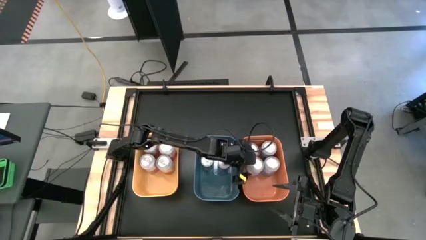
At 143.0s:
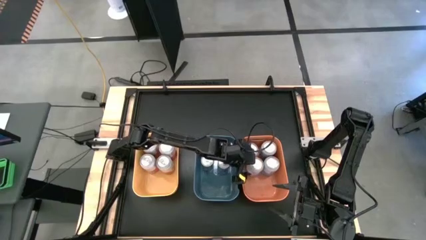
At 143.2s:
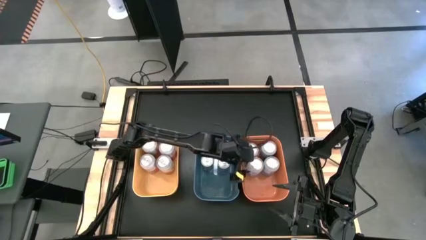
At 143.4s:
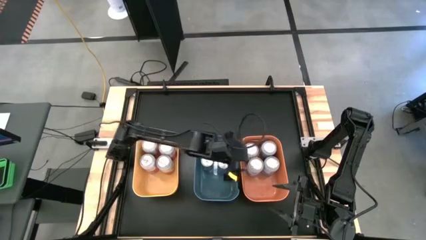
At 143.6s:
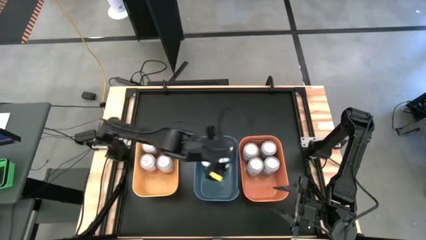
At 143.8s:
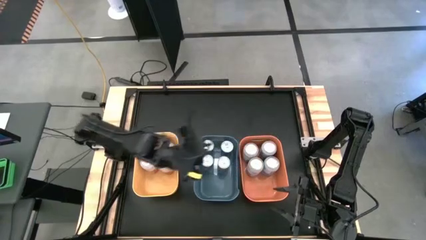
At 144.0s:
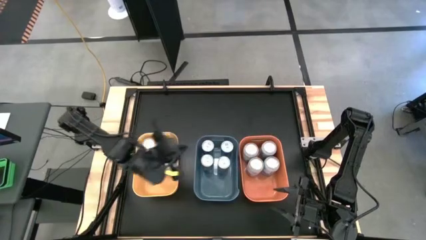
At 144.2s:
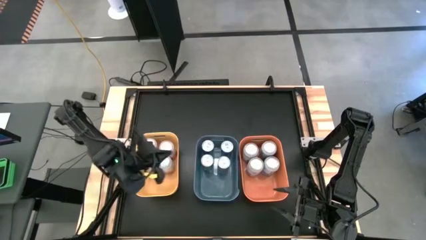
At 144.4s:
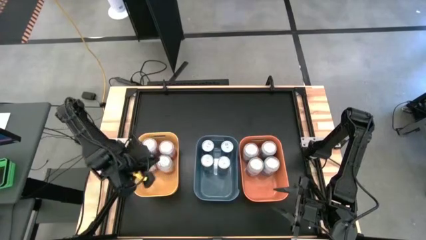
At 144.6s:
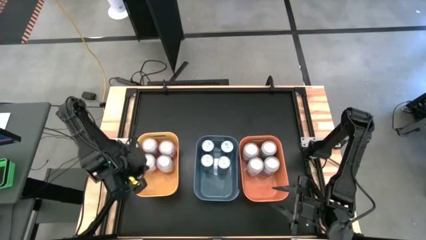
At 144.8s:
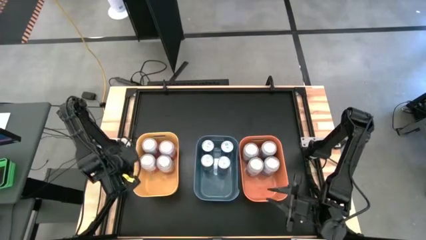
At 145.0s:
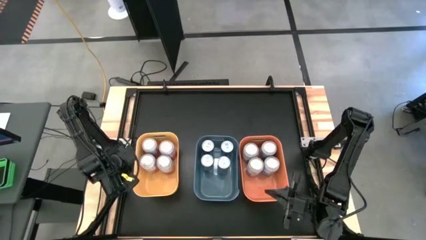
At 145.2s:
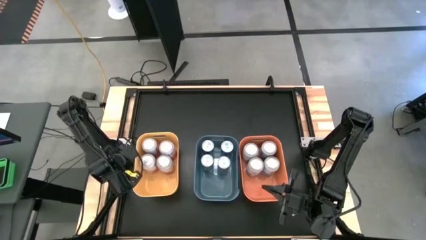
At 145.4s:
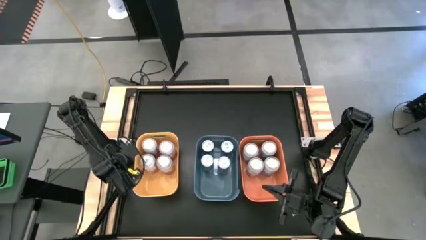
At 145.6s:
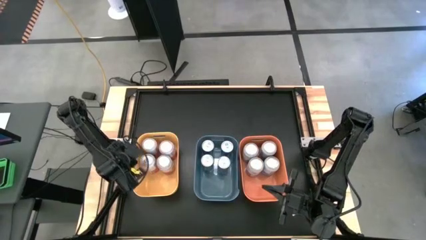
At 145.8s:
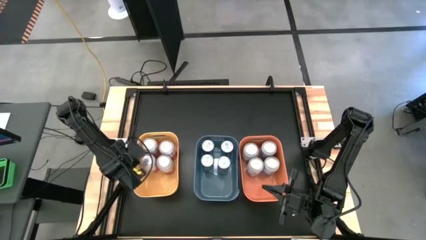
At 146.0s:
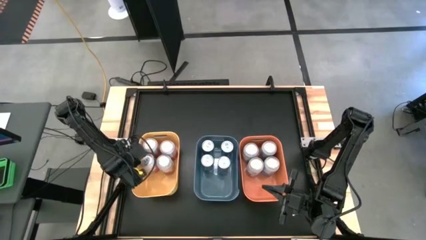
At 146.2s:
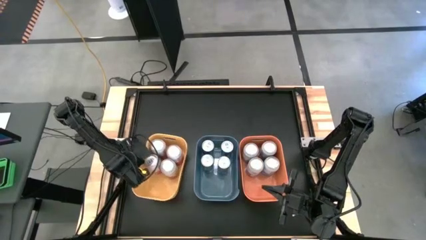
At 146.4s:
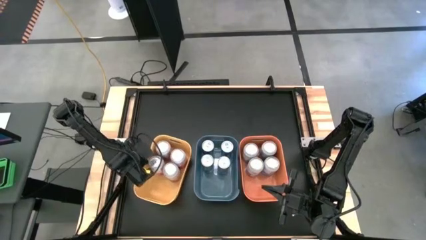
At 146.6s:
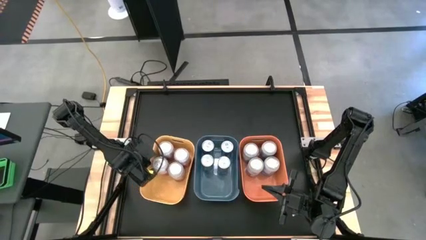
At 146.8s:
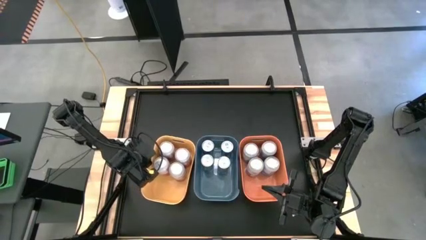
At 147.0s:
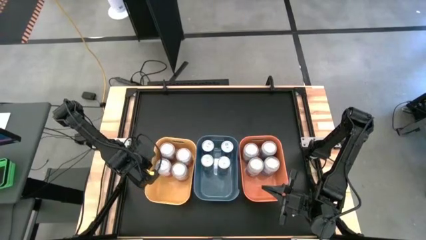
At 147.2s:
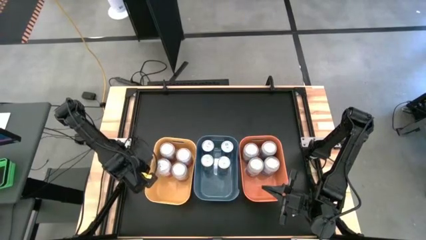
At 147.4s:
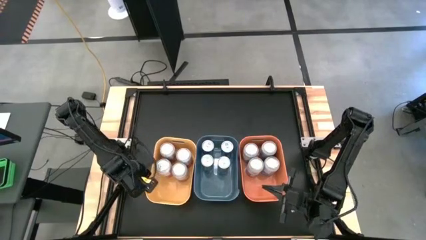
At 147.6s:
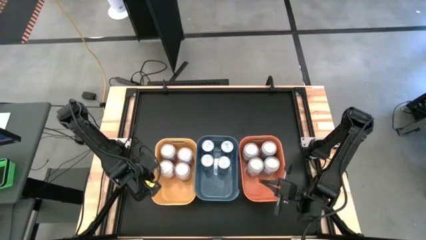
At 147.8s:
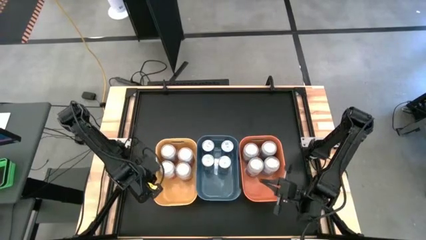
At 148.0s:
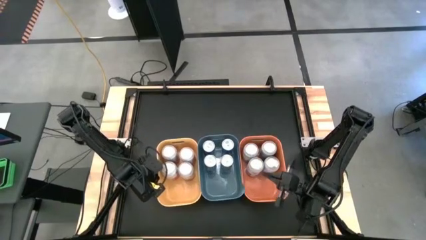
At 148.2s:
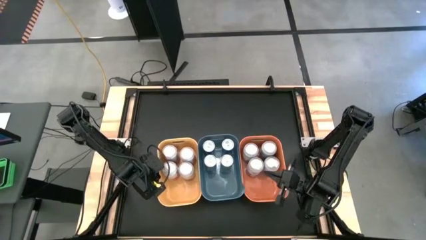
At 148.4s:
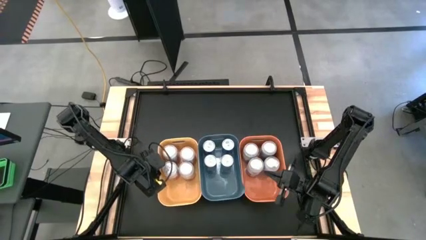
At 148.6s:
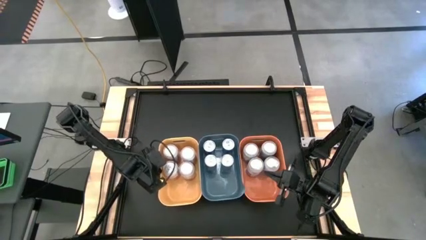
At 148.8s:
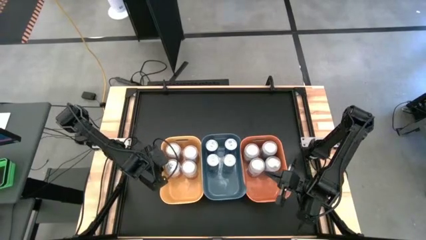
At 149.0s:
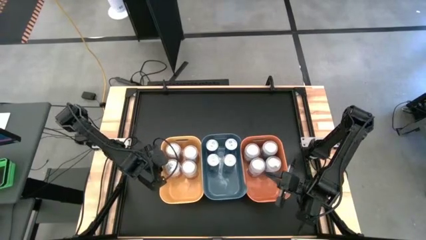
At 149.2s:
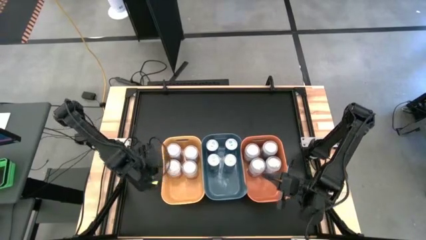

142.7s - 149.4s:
Task: Sort soda cans
Adjust the yellow bin

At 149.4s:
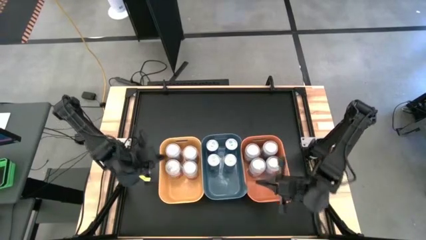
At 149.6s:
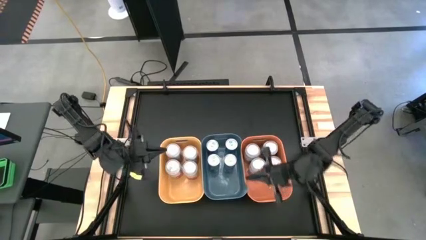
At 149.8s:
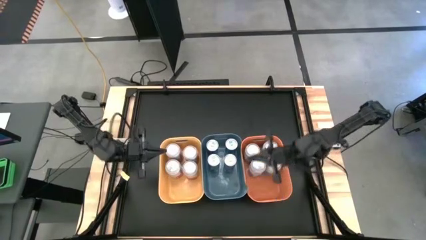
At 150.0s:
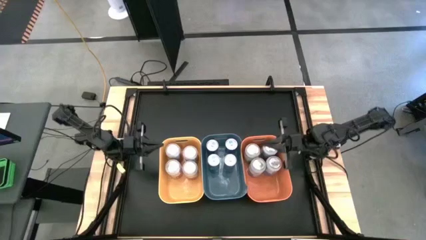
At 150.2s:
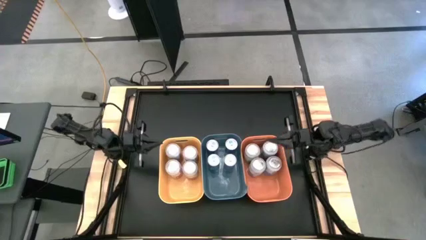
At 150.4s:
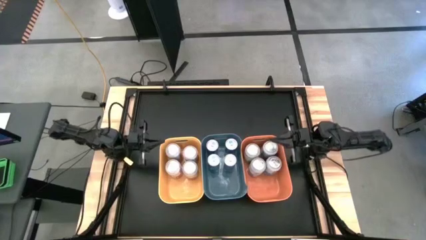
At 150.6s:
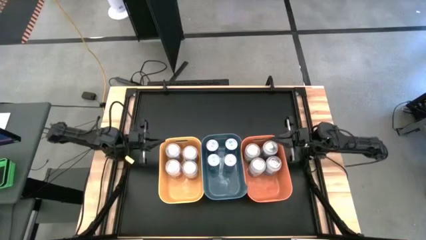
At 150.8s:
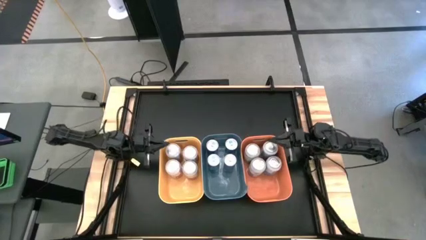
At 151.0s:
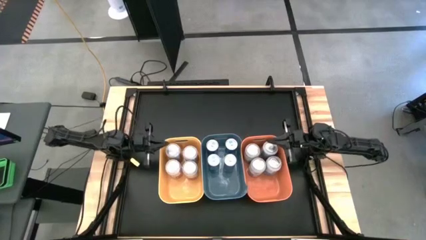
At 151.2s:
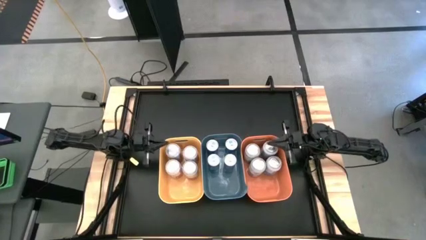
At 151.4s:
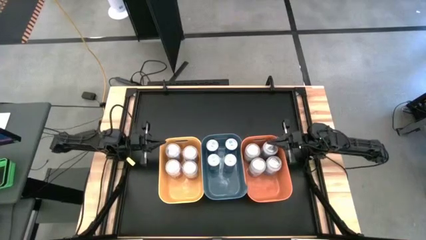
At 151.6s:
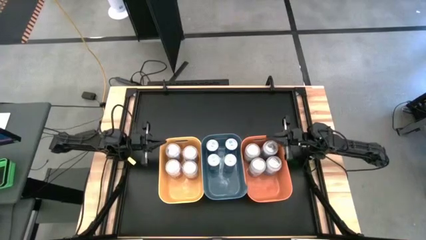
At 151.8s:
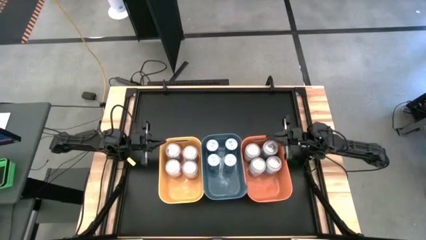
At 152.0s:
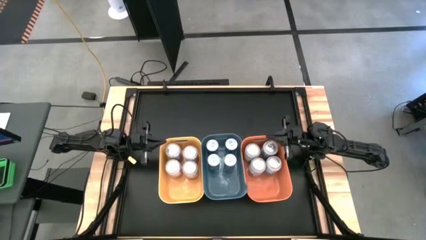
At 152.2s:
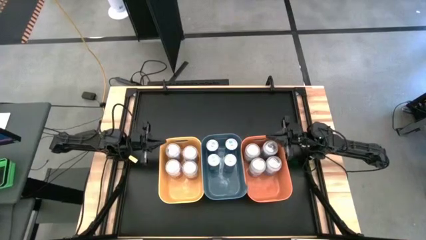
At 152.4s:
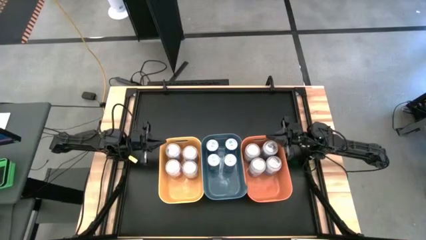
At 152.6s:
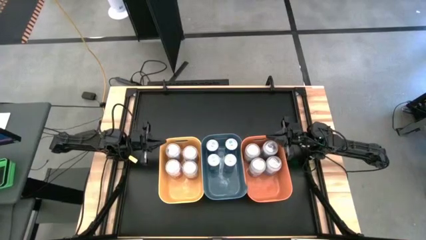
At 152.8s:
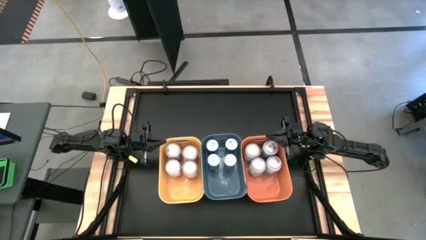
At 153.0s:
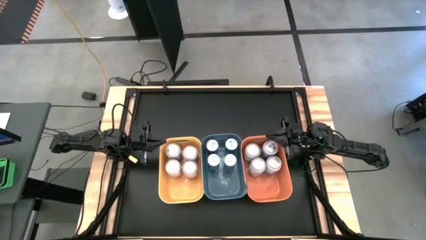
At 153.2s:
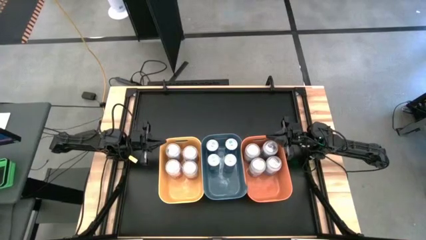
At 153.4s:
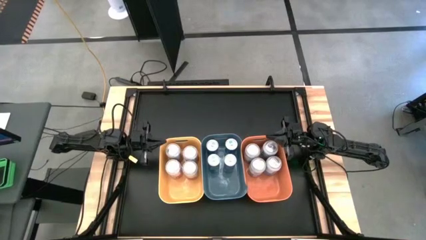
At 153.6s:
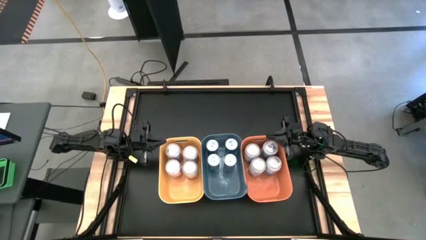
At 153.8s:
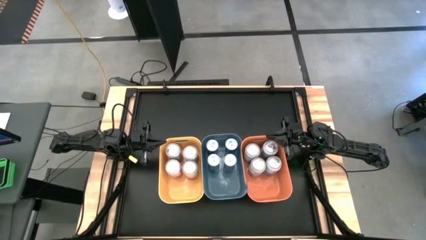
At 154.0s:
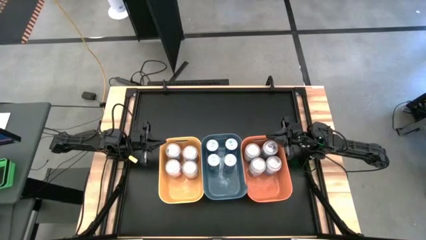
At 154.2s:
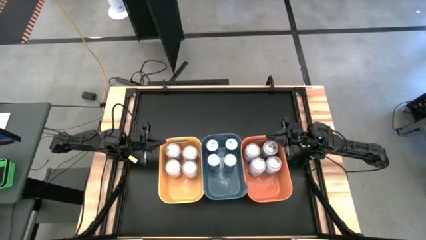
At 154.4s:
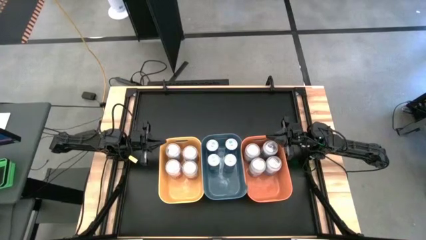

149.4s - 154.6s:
Return to Home Position

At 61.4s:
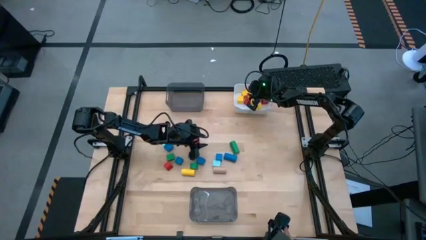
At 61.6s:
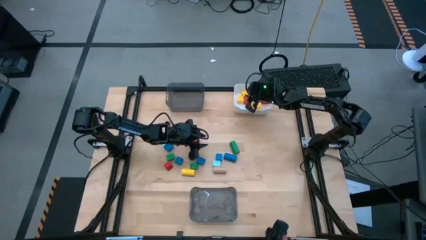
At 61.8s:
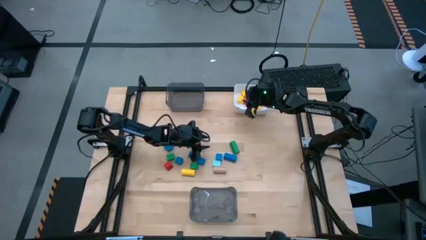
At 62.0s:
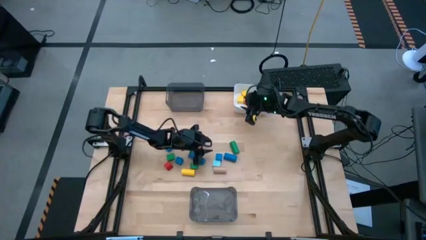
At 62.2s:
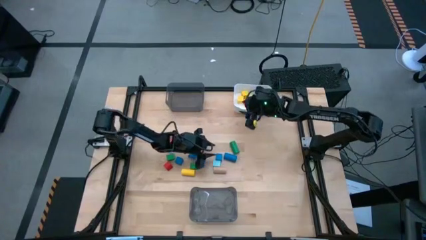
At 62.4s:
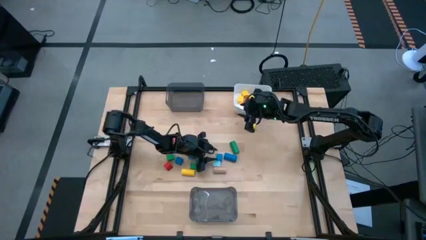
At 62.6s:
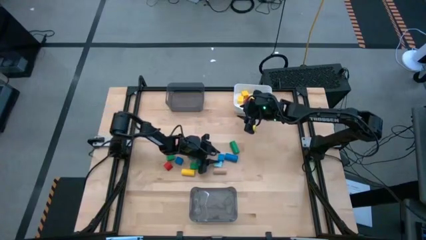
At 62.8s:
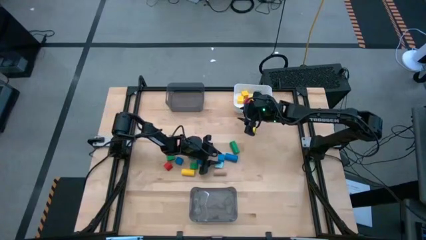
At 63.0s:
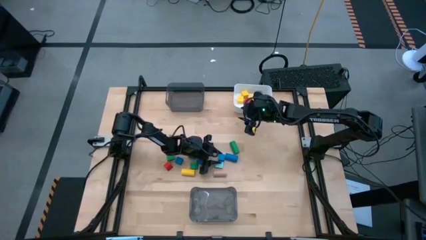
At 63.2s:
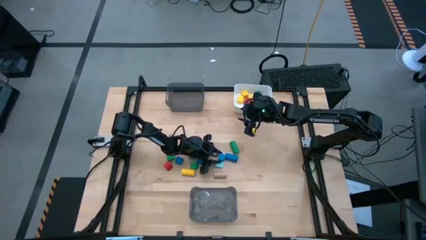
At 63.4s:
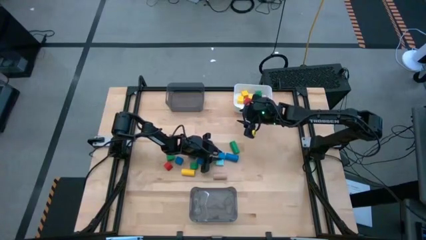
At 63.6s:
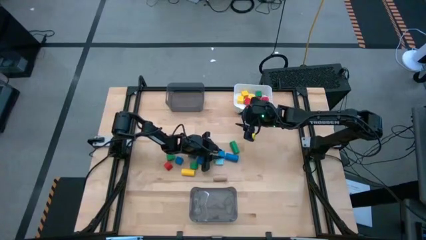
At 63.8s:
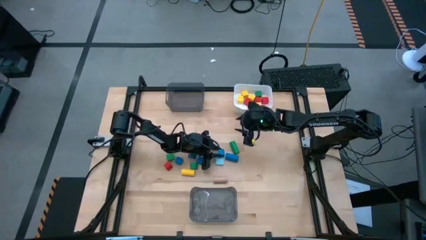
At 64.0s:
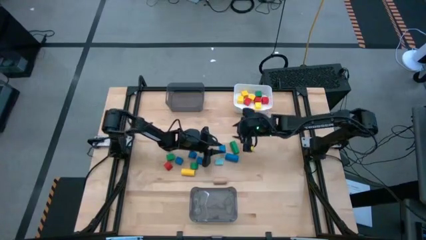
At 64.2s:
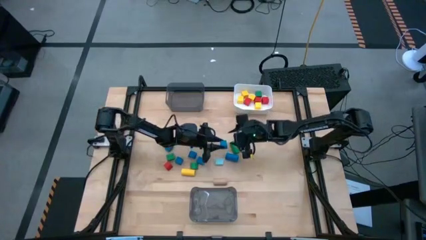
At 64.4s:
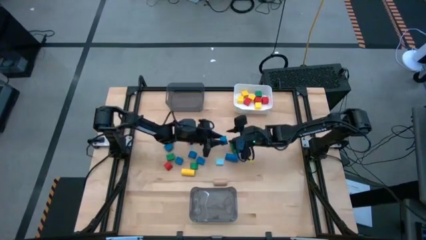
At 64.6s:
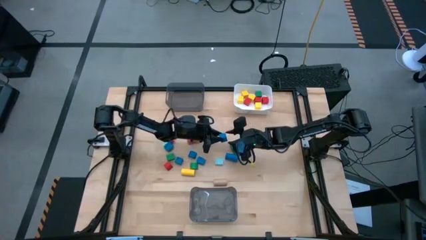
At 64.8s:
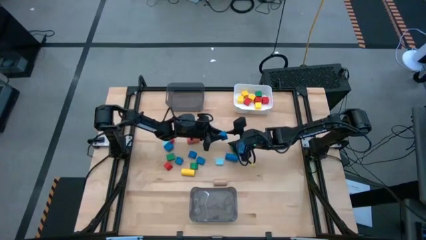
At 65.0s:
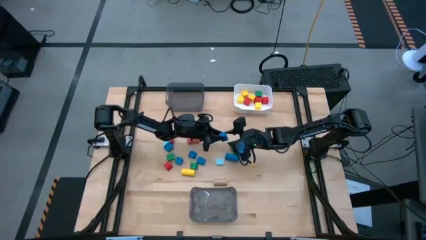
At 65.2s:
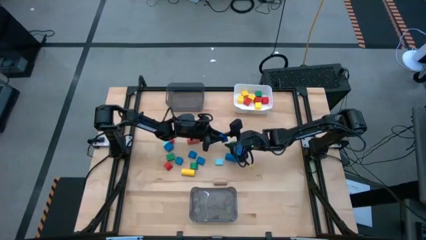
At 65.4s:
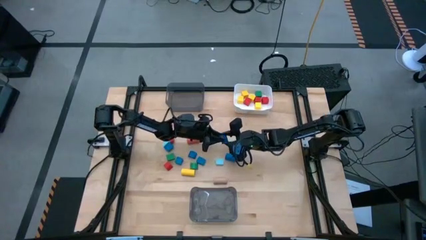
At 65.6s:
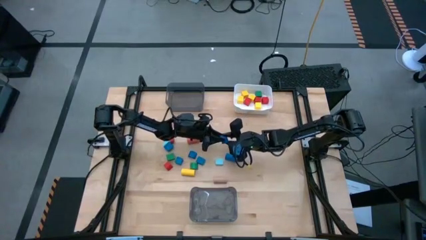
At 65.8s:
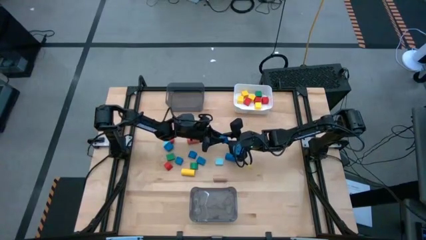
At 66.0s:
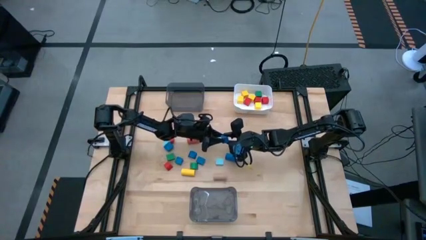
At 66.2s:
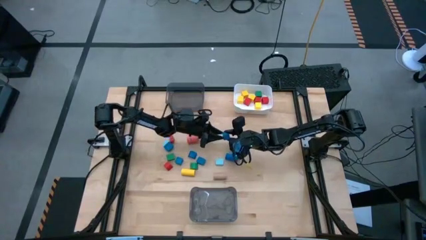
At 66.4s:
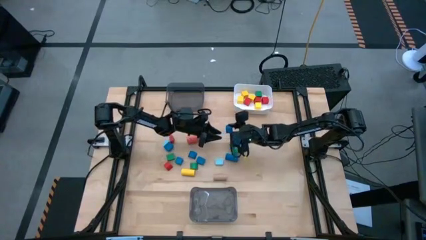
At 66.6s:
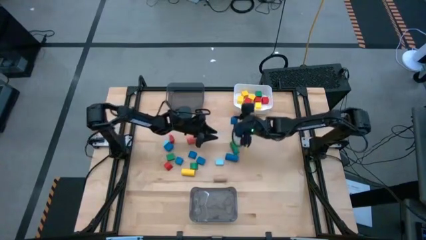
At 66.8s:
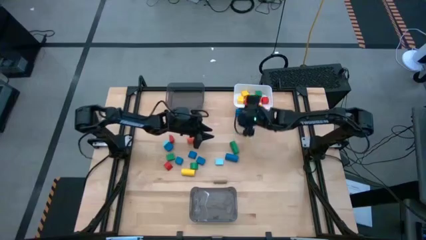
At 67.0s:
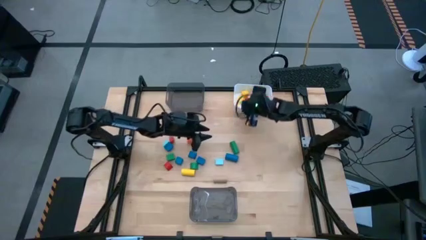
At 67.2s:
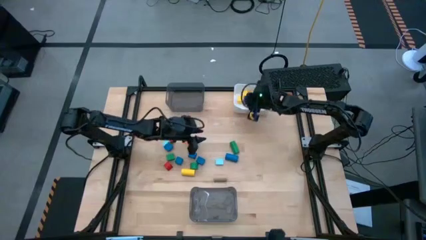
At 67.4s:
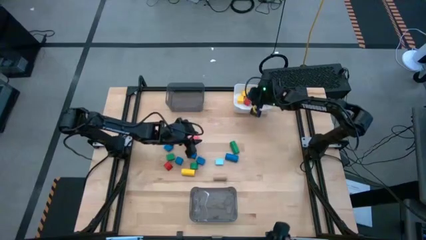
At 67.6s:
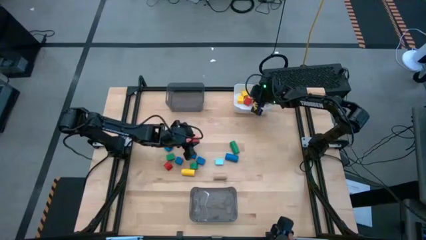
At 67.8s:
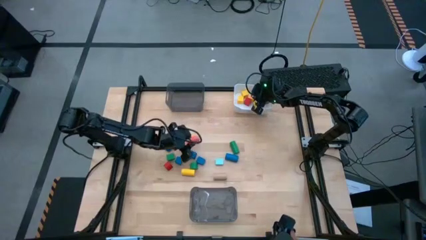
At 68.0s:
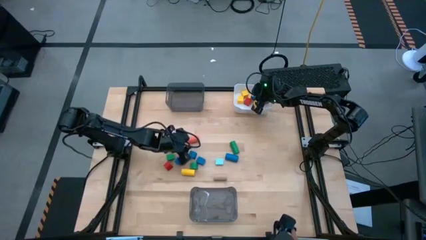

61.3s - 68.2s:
Task: Sort blocks by size
Put the blue square block into the white bin
